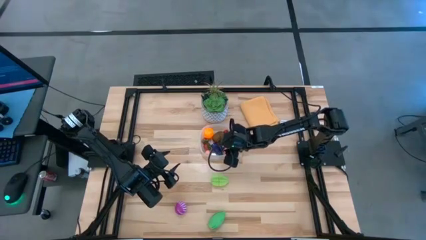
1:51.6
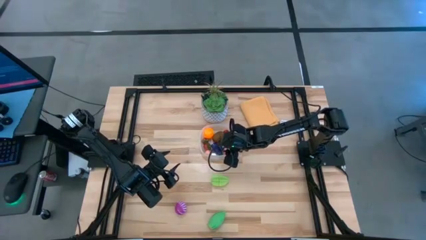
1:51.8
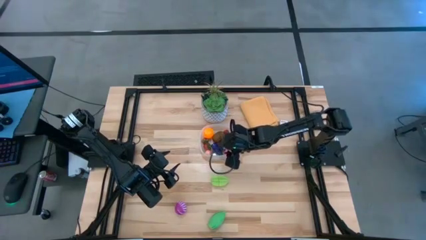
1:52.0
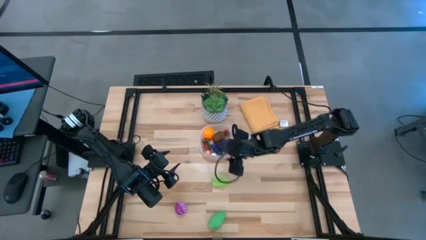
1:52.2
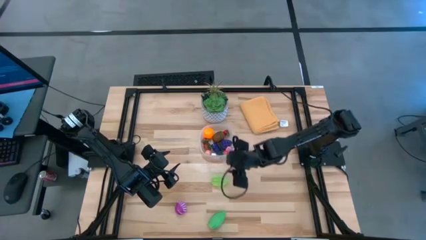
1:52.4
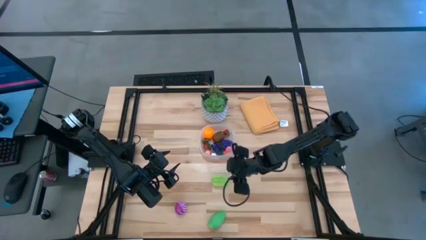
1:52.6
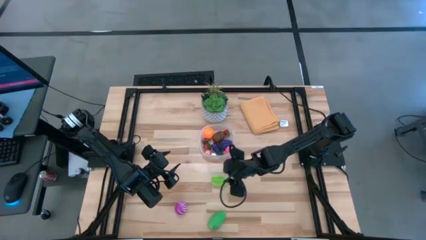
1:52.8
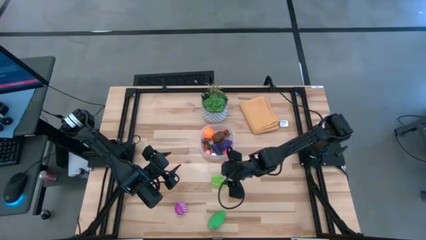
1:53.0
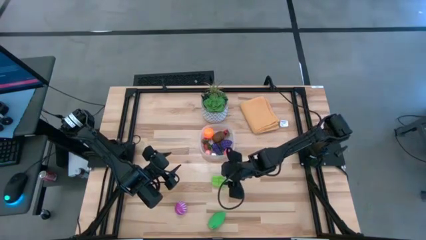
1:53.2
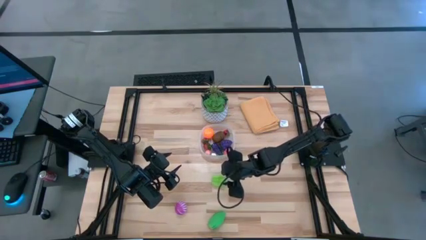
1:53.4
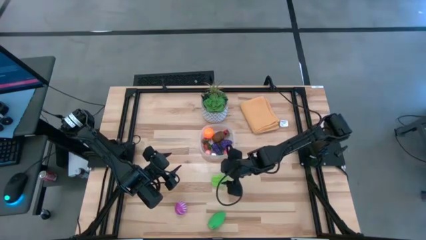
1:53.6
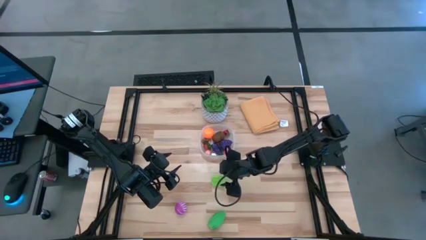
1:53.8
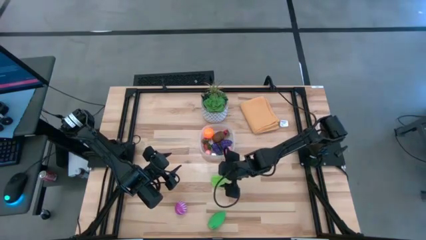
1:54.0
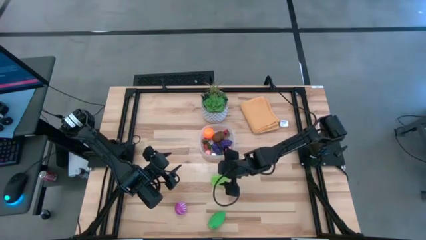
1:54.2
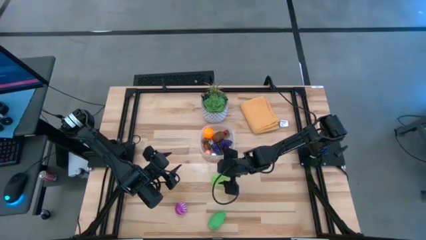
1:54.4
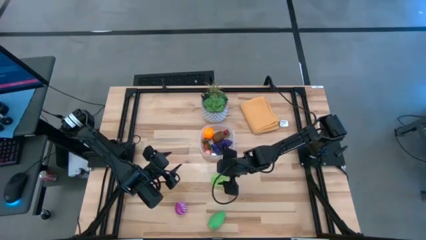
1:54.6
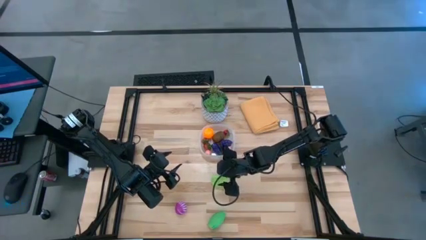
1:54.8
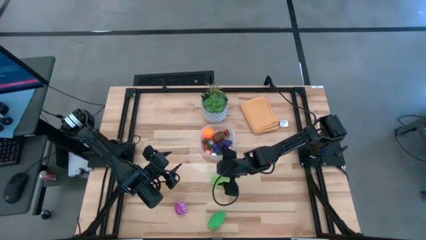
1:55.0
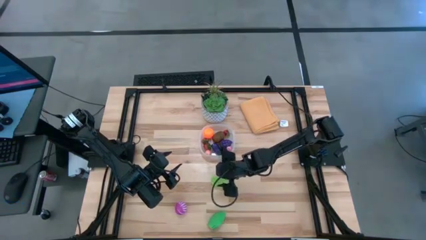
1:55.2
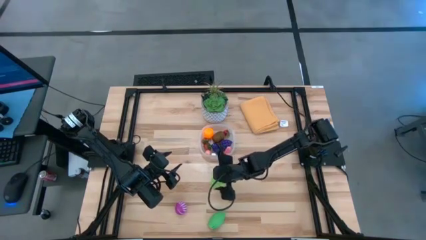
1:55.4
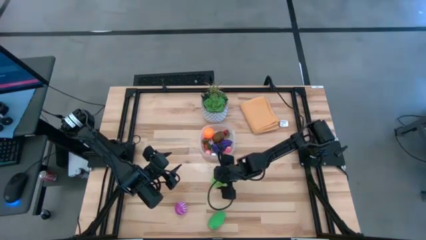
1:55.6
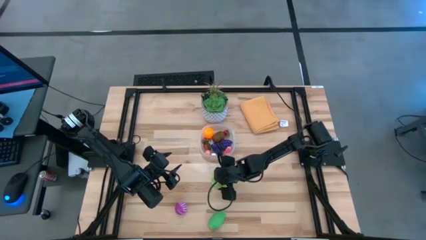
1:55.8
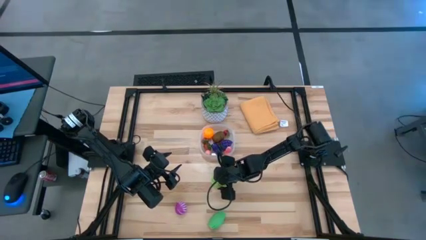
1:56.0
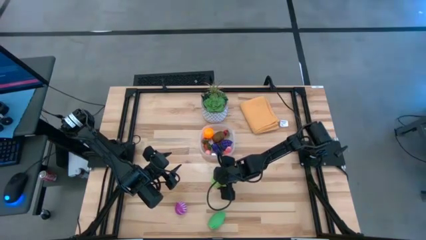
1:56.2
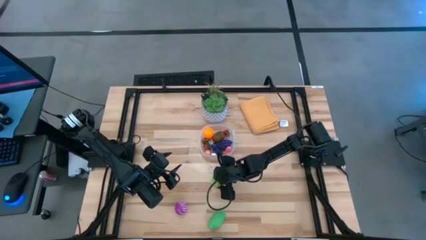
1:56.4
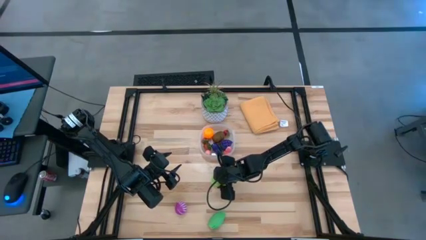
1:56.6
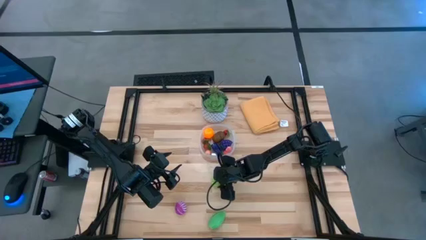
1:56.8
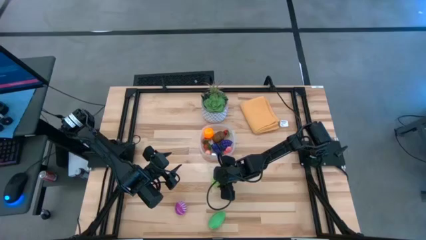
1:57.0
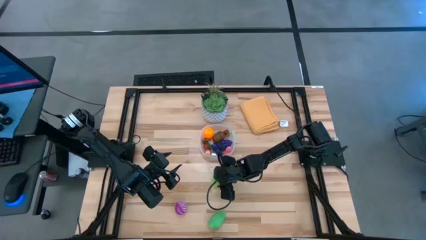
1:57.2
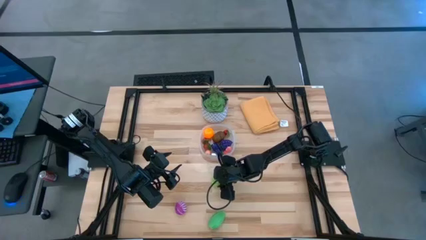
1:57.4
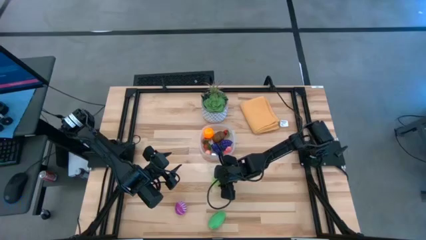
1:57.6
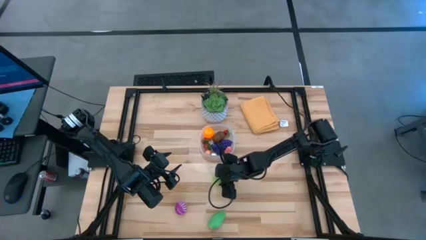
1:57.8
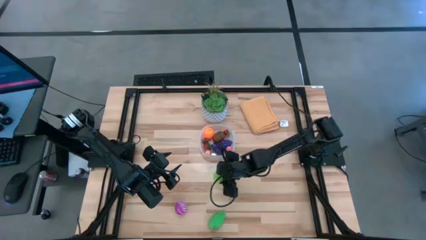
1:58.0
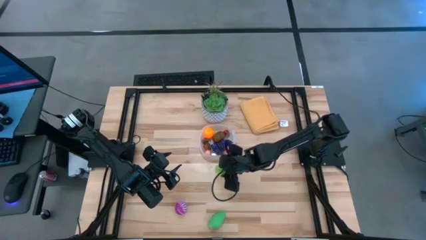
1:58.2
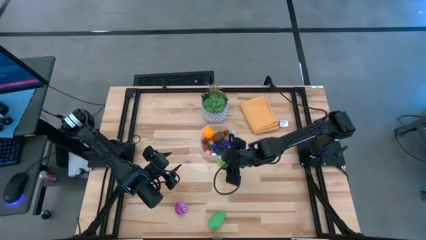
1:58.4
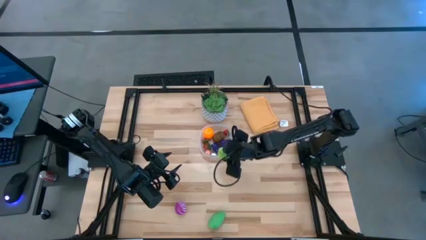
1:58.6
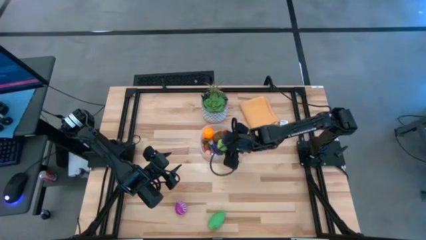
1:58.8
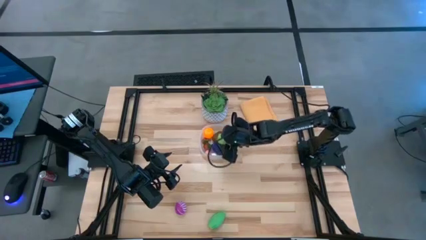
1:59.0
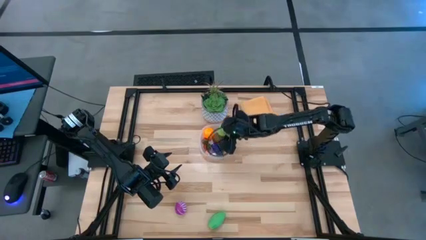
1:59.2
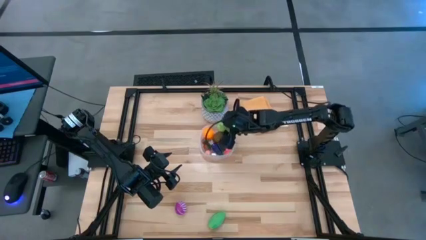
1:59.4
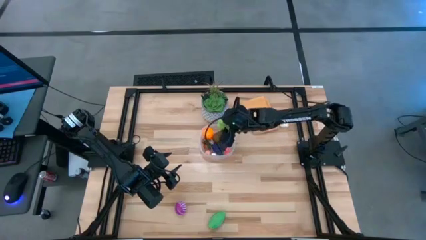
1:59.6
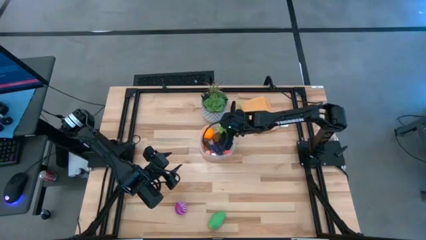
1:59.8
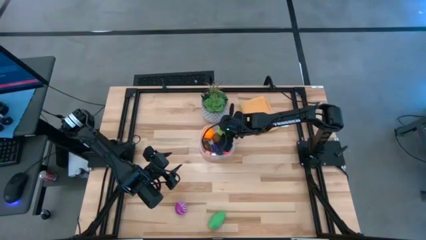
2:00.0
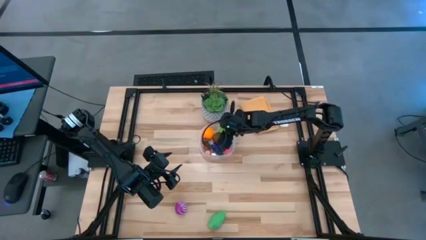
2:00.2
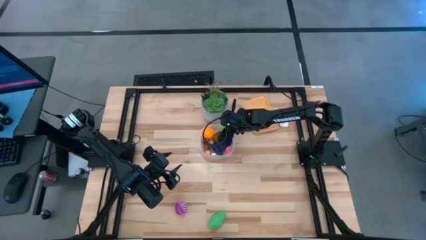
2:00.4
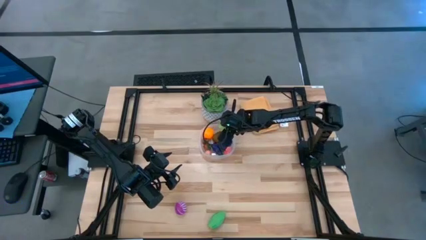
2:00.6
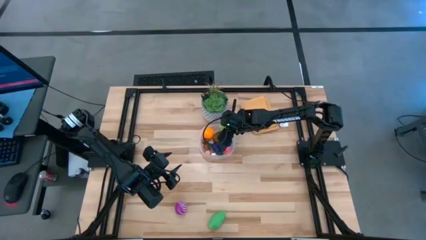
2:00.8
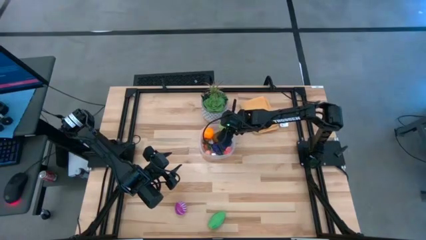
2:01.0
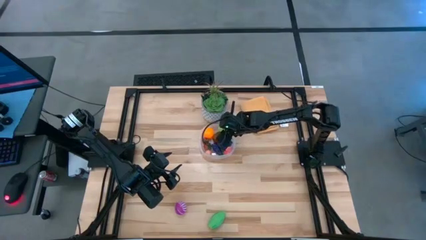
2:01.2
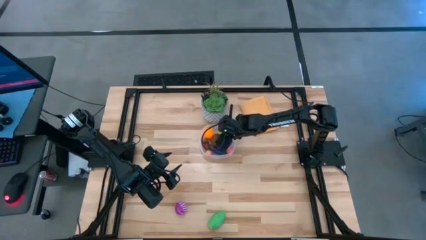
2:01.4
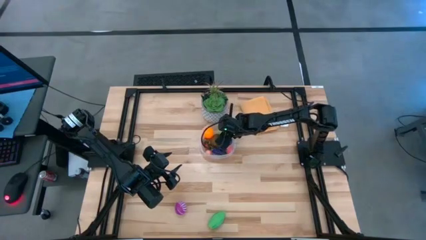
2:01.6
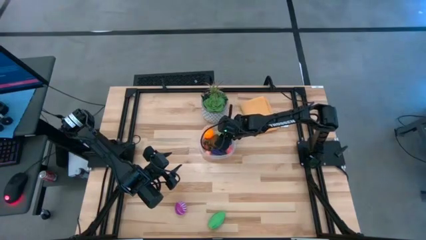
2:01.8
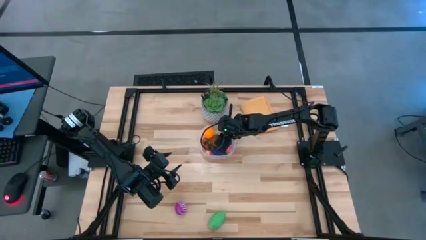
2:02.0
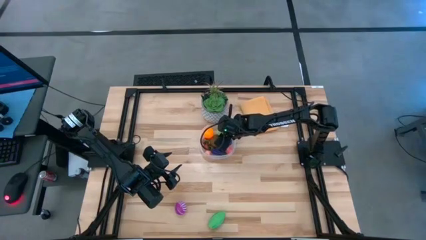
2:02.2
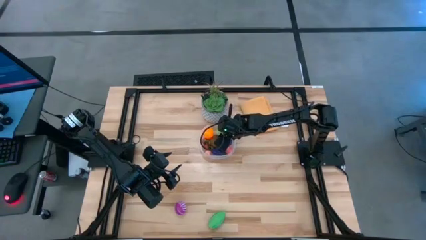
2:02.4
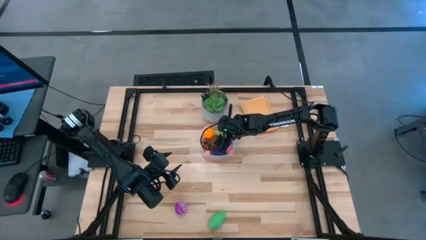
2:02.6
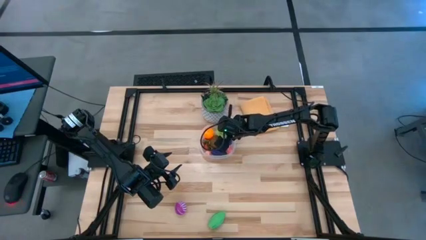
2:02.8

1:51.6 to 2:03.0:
Task: Pick and placing Produce into tupperware
Put the green star fruit into the transparent bin
